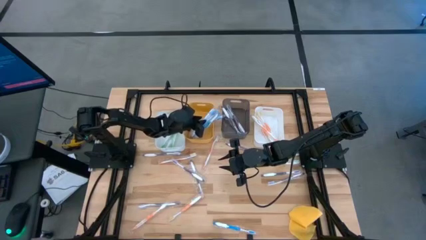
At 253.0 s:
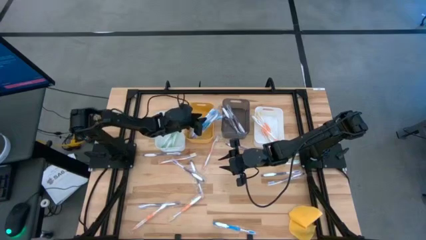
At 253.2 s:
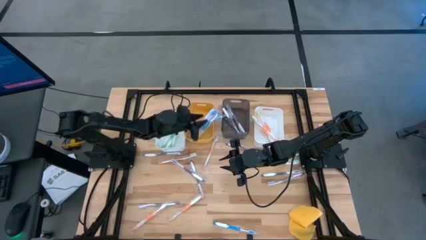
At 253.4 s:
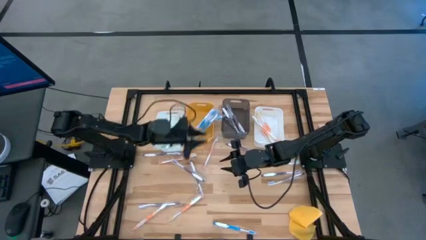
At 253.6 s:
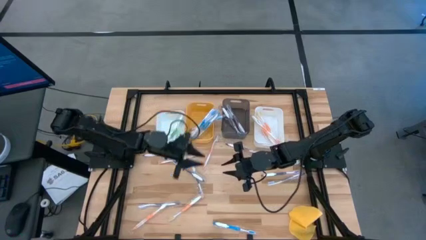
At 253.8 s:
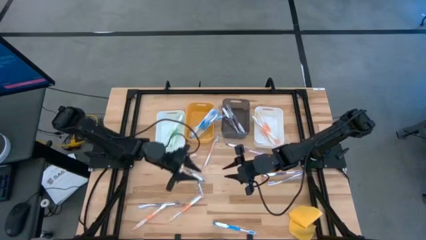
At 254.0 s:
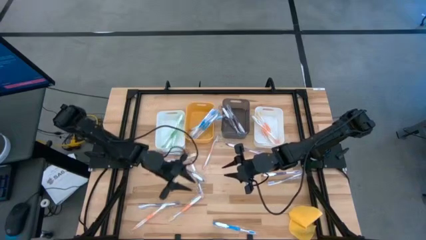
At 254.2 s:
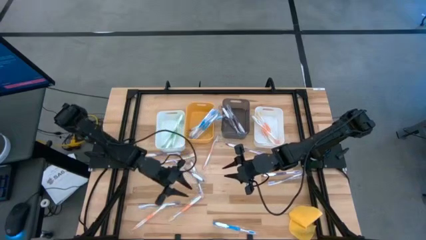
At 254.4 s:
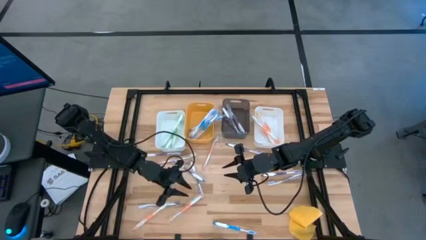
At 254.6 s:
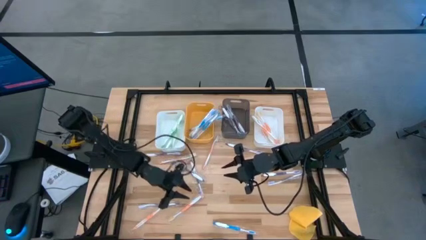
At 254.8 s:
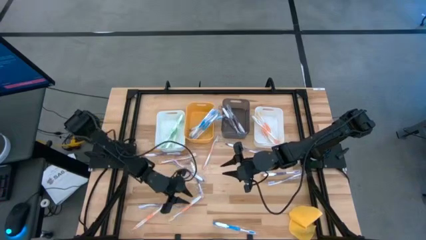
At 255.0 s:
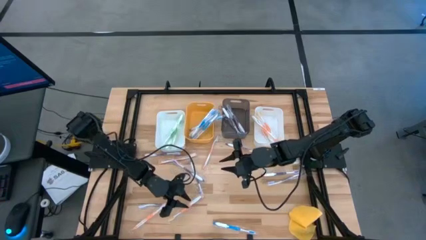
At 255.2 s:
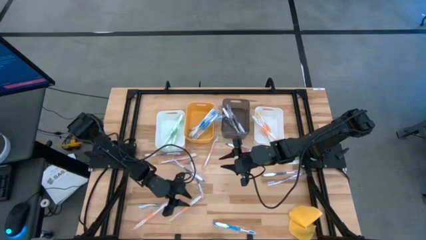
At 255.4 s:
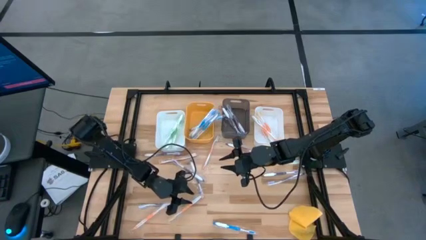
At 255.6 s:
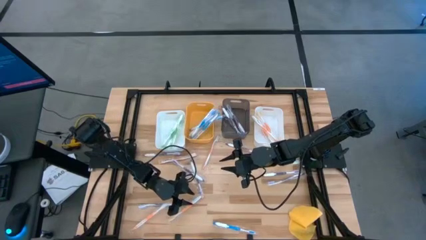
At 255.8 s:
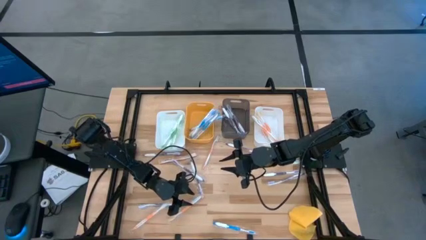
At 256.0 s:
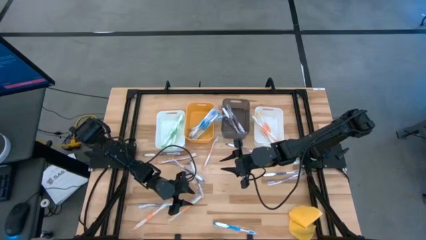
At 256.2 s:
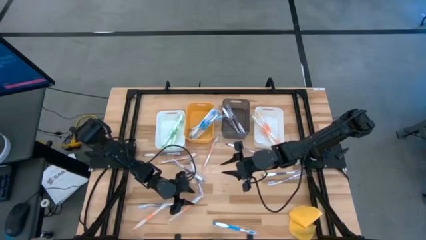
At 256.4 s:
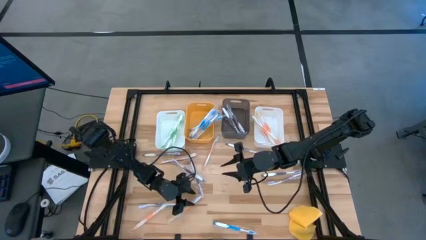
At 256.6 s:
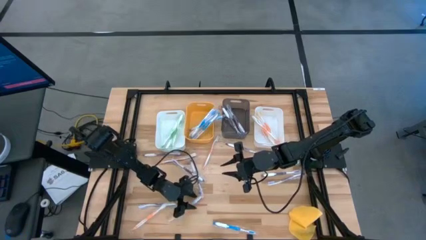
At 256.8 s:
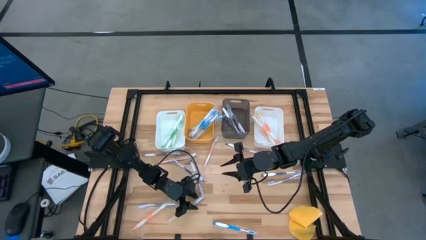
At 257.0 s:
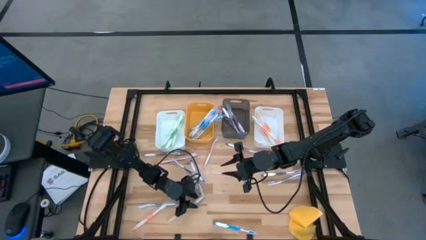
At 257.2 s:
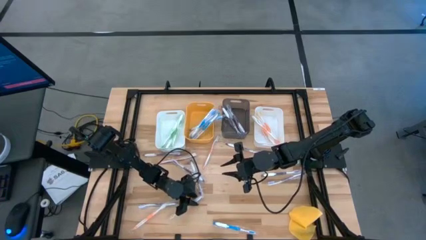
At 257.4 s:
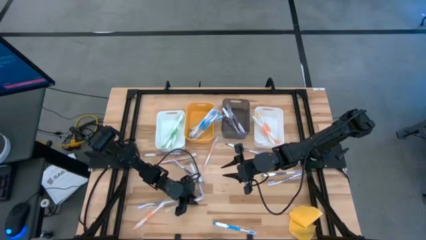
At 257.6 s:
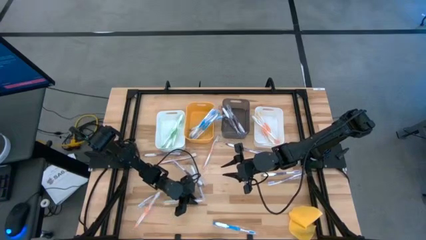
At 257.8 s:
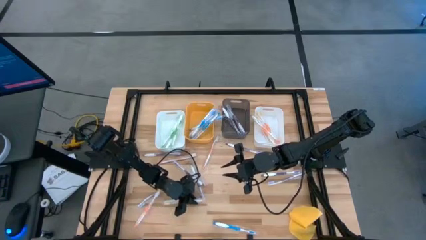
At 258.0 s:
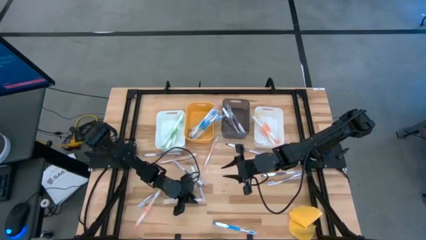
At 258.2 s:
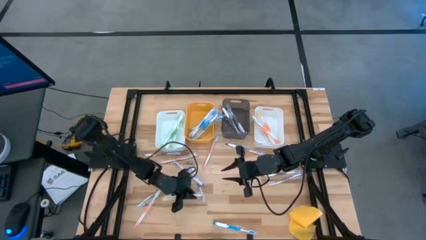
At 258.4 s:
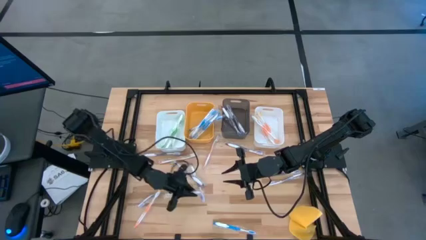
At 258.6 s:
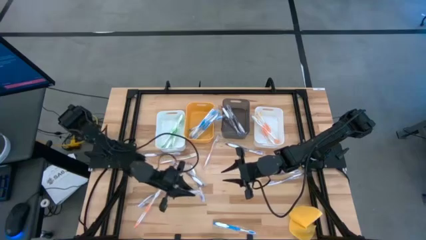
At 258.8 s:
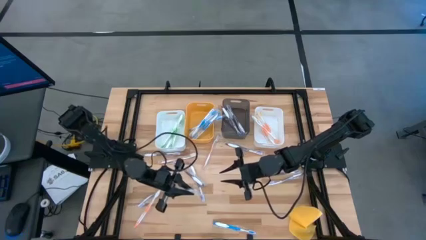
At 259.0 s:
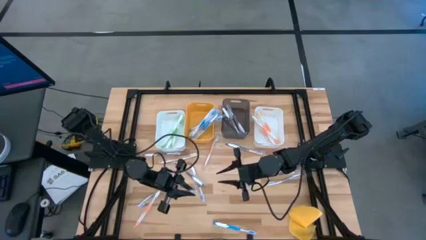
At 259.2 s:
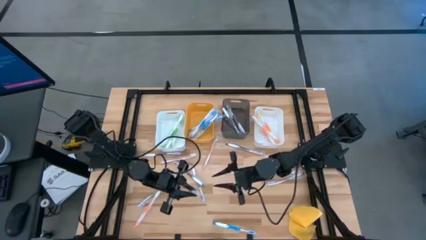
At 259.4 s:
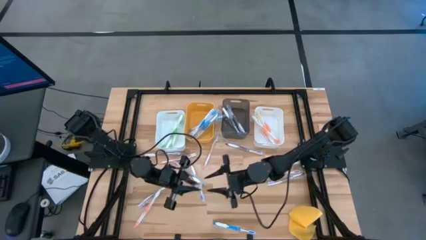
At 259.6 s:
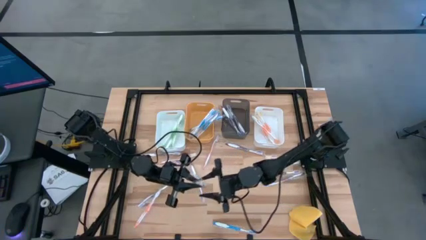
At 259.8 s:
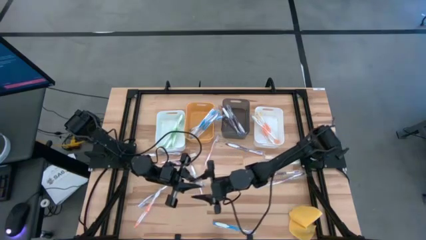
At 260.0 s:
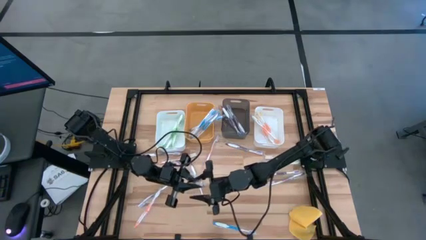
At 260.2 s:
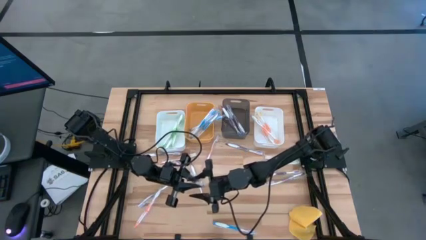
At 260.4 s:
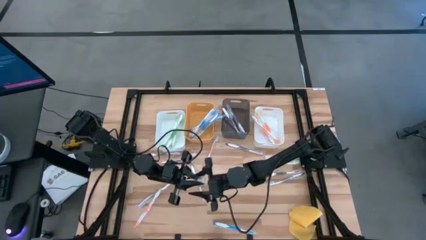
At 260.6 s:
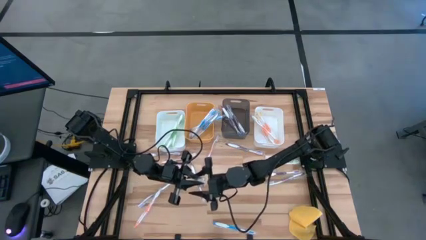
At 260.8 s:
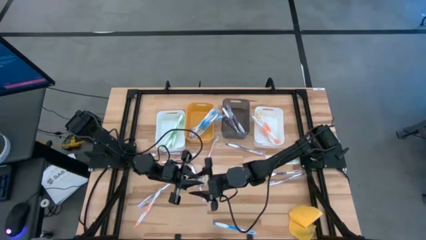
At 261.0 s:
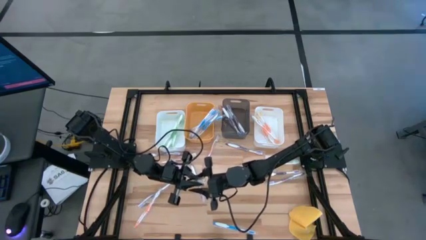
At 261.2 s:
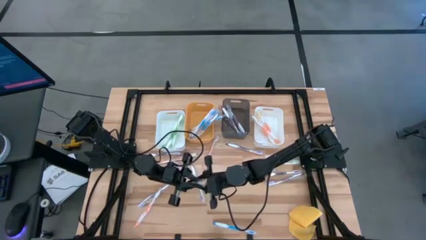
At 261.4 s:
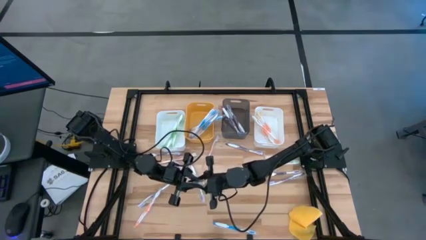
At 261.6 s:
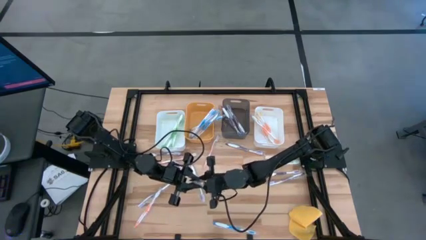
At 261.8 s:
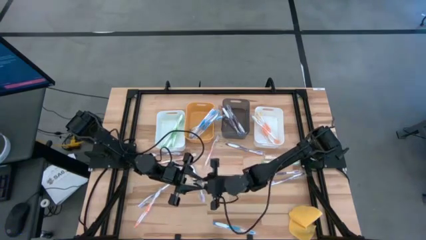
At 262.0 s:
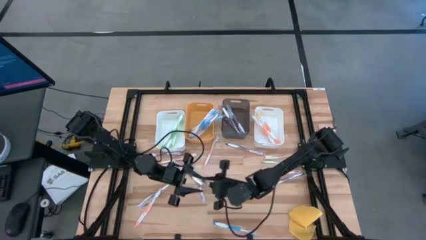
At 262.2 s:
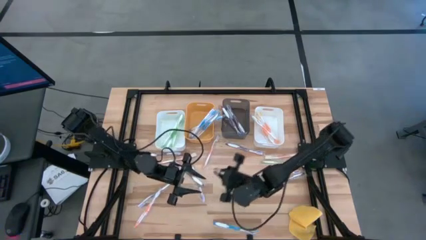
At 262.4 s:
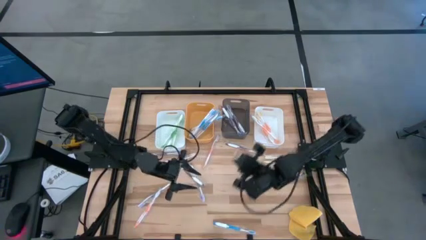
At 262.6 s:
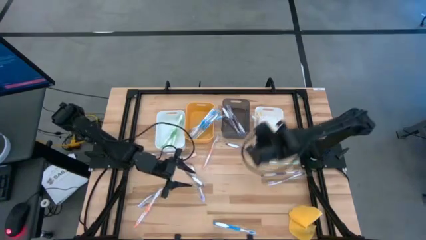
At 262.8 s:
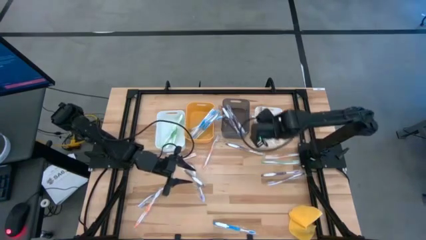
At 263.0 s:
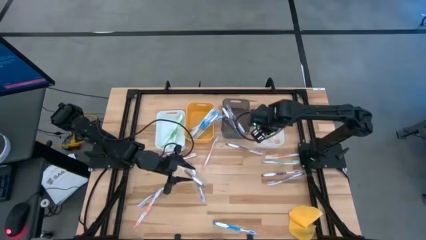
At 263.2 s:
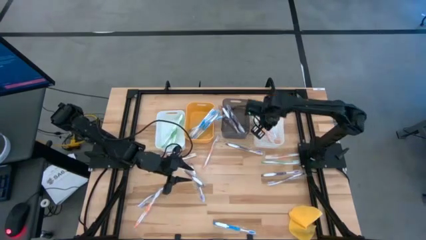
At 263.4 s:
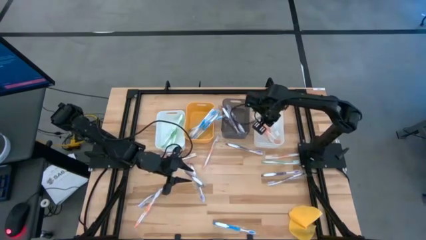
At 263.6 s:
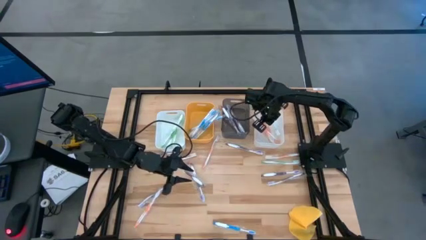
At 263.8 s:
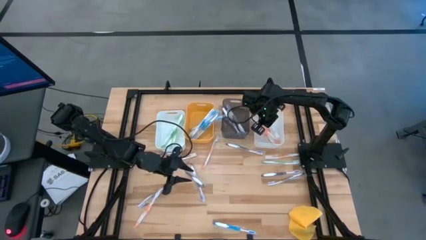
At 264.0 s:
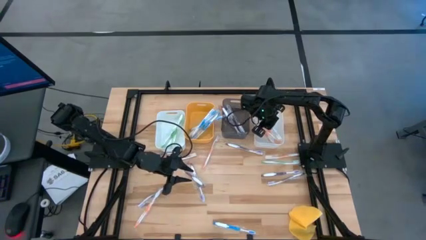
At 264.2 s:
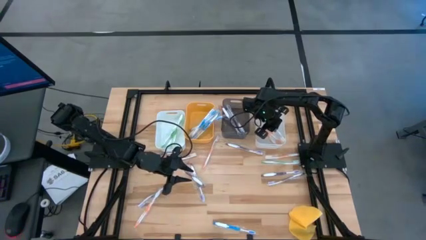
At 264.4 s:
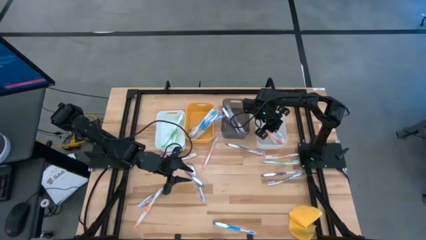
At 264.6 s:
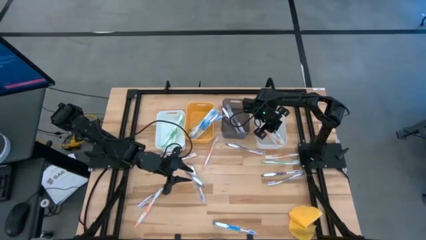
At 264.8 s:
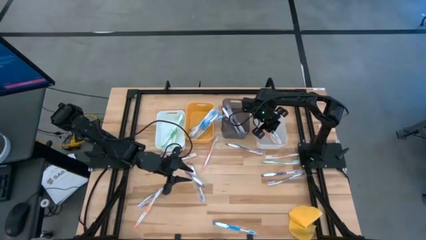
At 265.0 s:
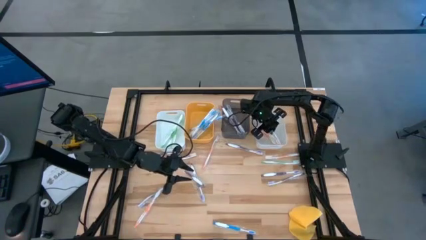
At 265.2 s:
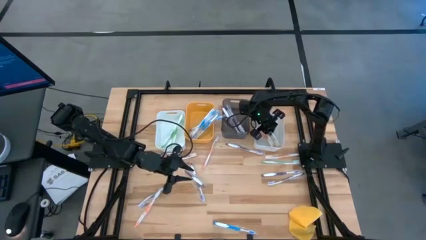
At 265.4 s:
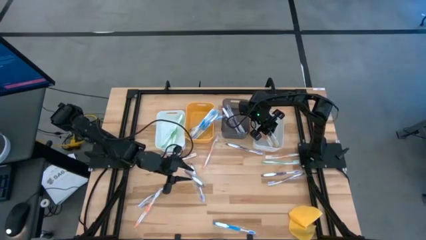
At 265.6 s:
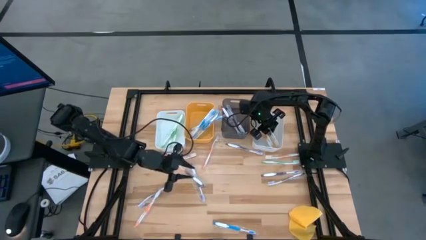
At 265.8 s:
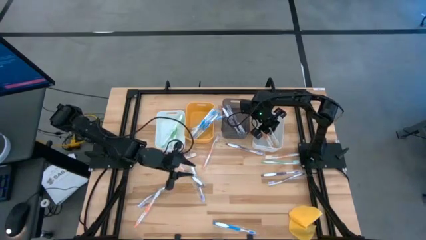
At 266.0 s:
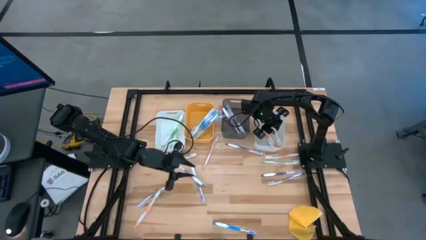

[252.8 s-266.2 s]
Task: Pick & Place Toothbrushes
Put the orange toothbrush into the right white bin
